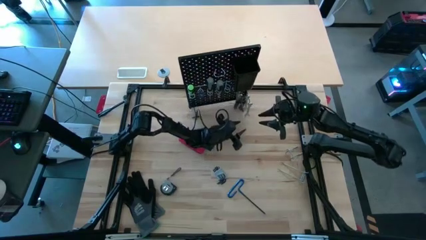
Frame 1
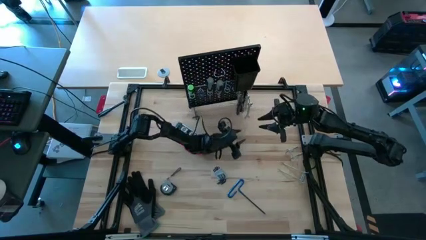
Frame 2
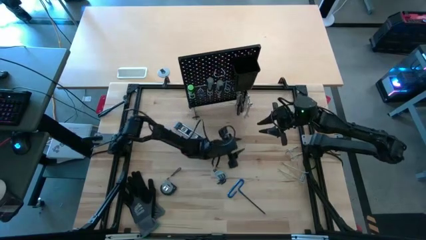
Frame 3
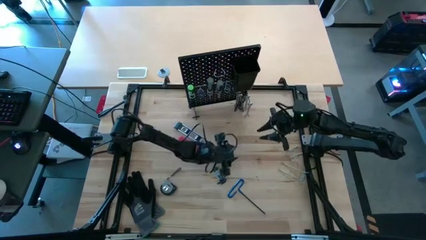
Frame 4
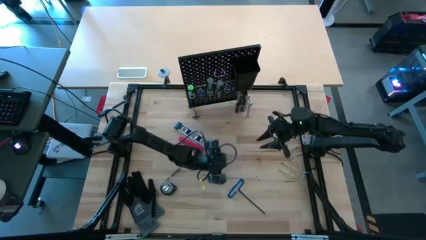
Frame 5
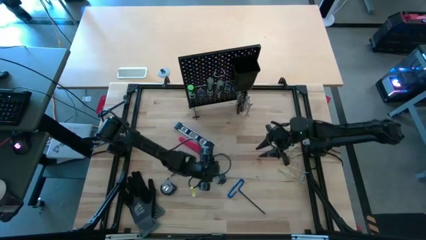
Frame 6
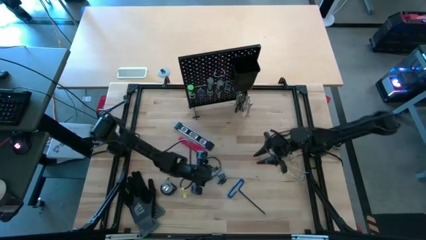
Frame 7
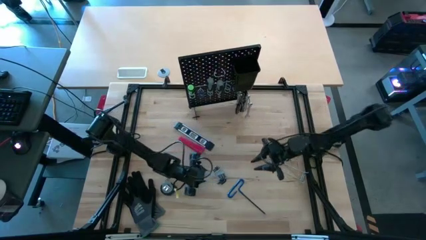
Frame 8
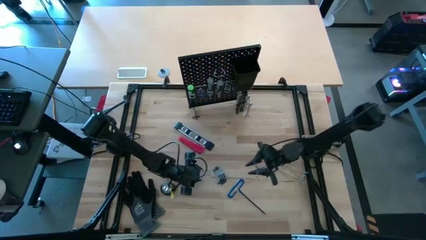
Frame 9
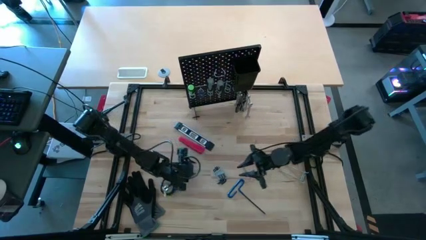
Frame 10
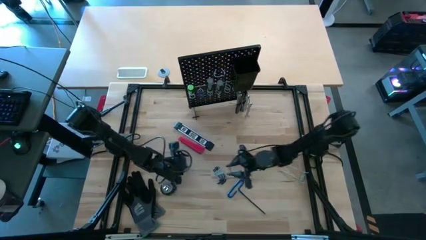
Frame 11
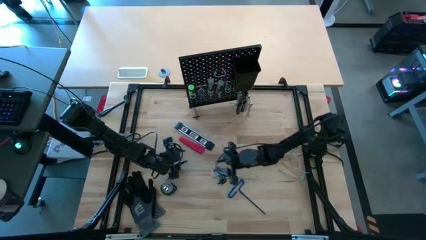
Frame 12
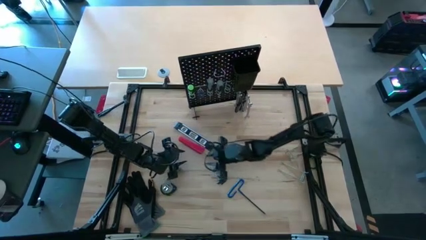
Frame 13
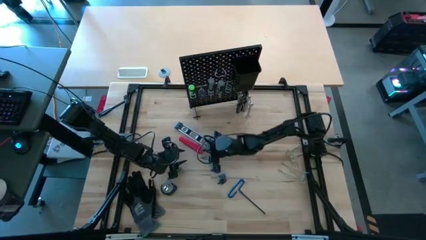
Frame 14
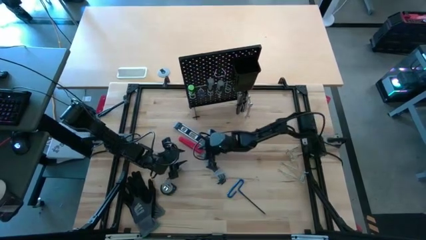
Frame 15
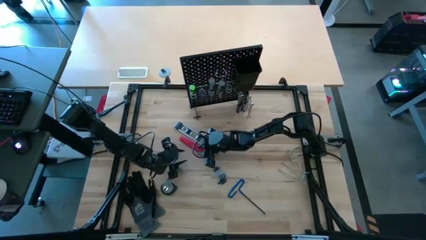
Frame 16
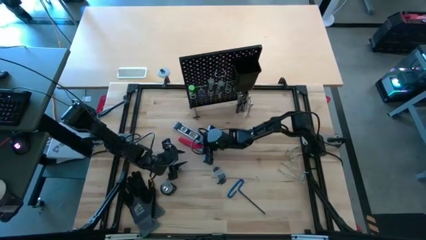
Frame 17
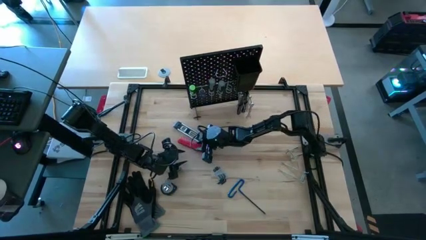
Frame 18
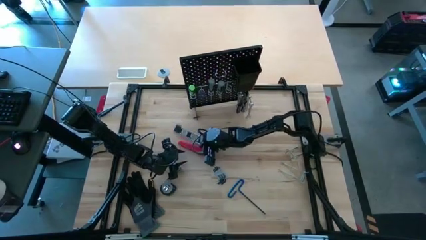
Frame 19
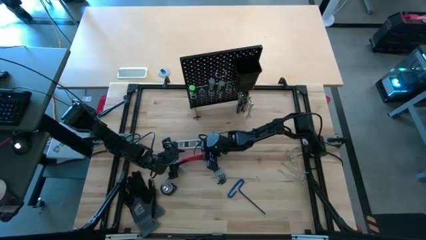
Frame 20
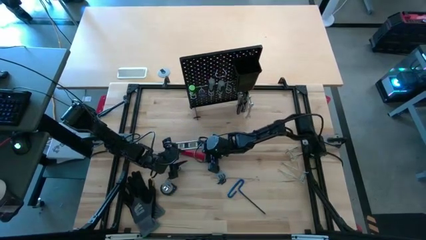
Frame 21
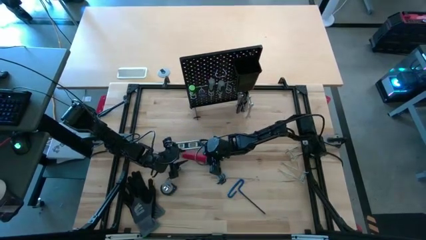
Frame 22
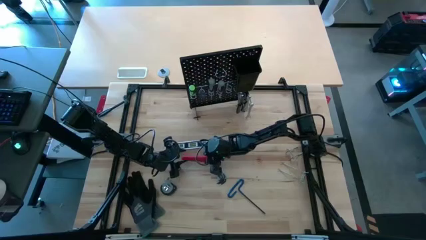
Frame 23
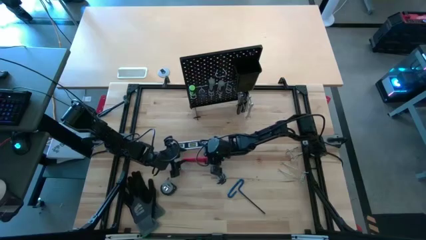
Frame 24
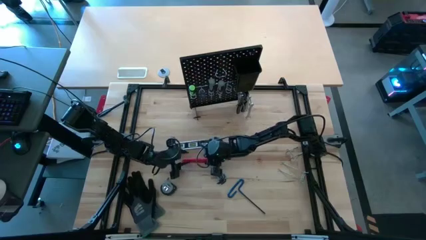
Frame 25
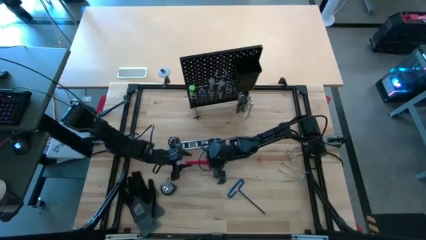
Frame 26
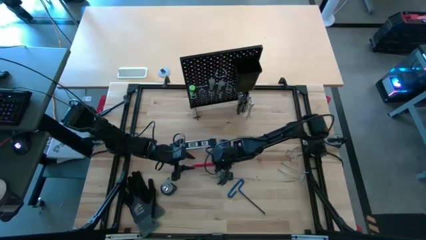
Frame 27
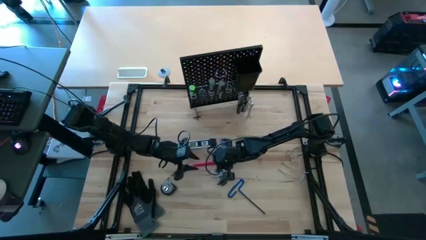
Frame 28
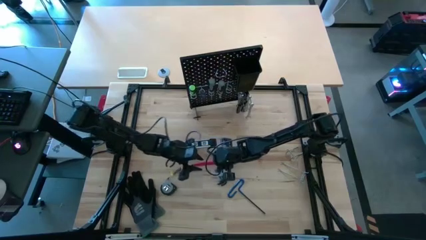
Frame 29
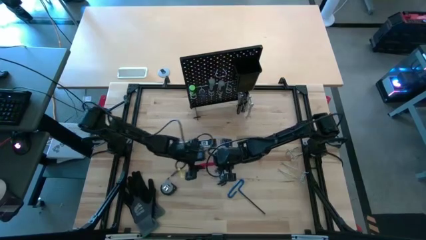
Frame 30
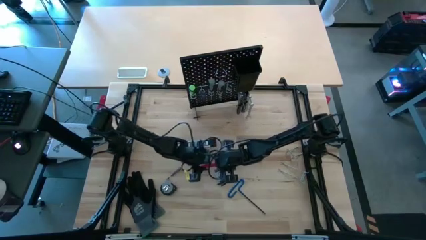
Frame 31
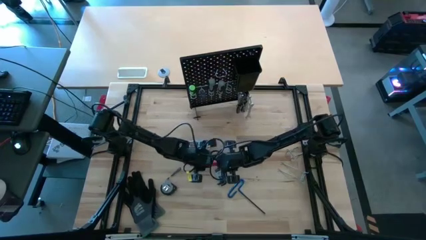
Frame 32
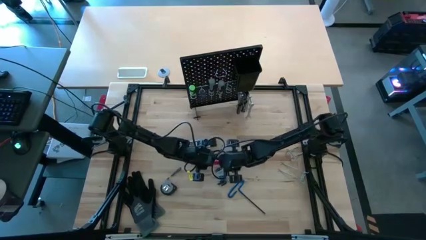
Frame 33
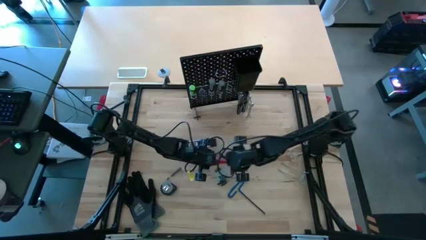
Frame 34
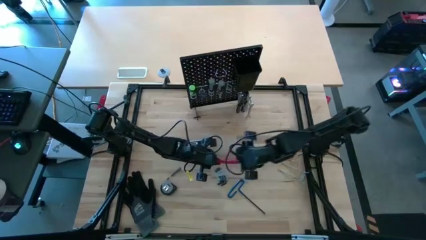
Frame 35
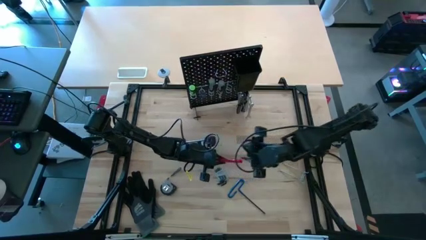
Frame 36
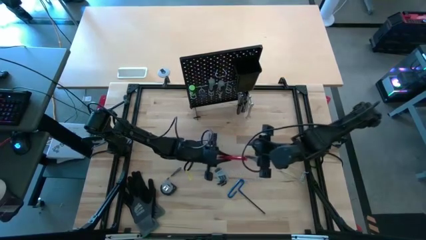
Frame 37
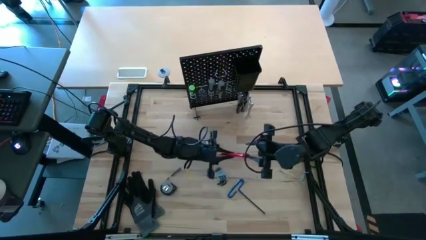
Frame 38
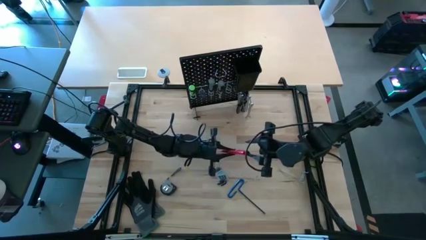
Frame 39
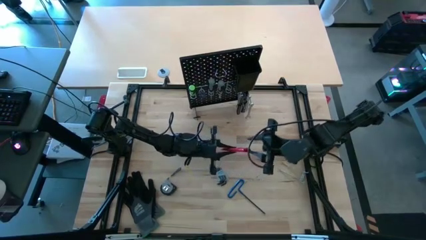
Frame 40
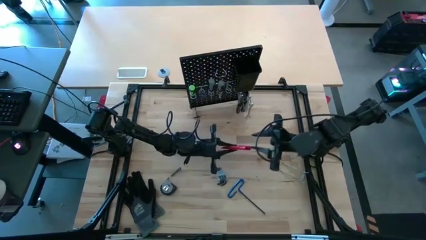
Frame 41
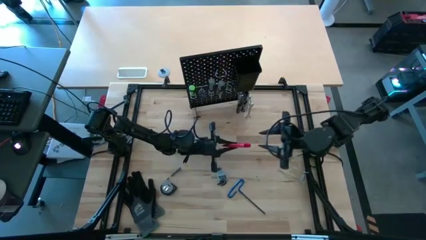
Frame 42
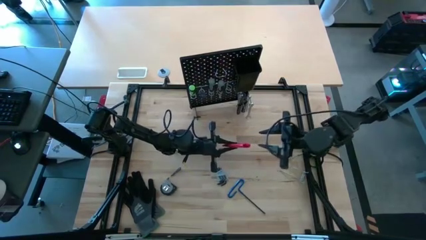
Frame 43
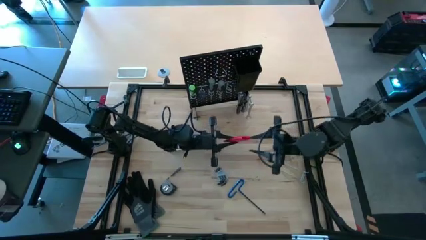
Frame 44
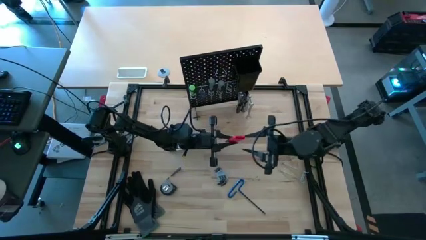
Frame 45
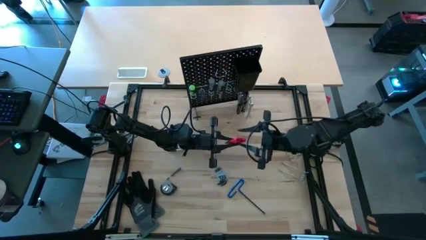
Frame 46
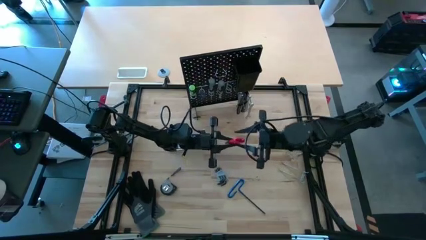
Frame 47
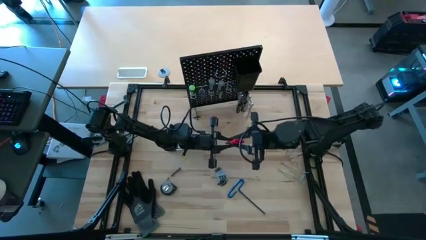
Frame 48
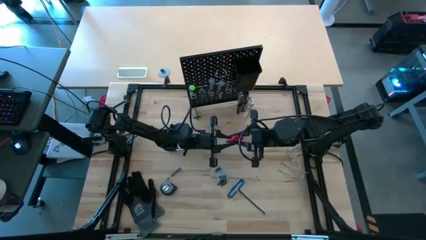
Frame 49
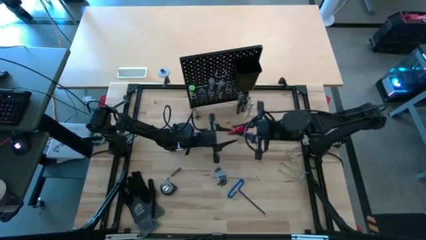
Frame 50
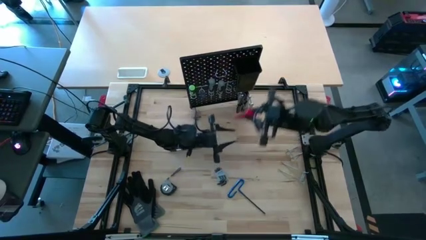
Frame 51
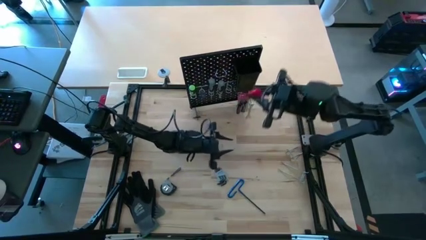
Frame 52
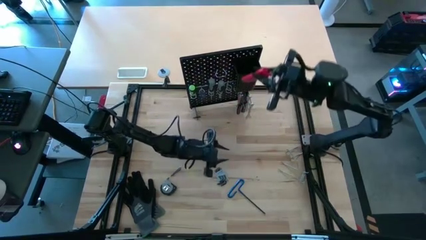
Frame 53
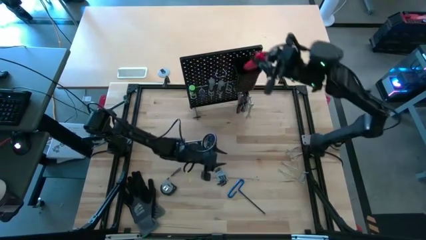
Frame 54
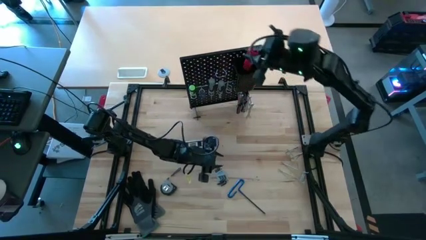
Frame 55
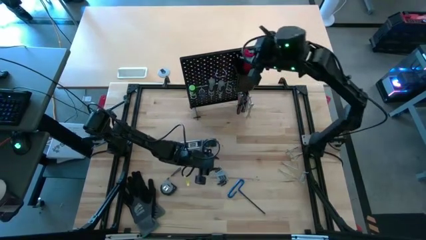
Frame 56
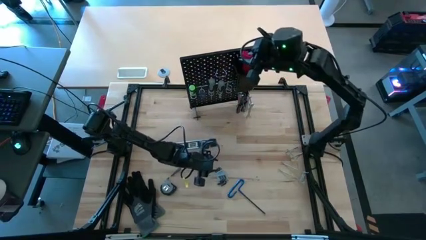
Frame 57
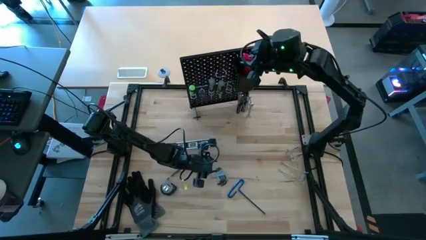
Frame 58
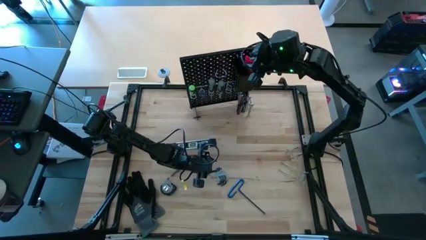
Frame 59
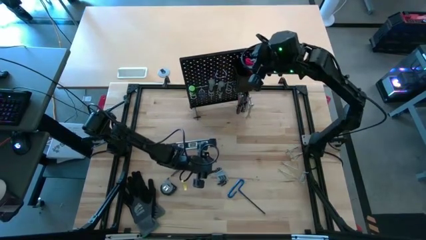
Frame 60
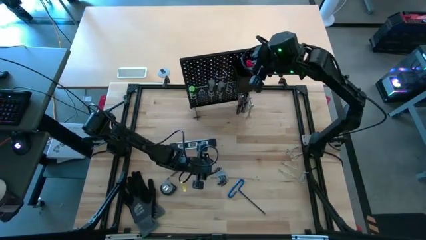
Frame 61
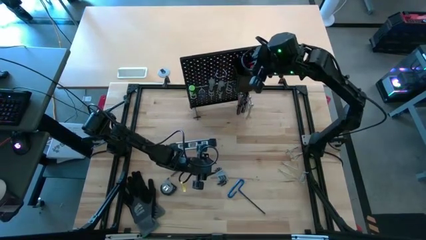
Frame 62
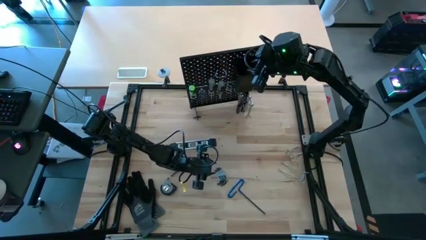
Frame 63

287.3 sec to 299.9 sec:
Task: Hang tools onto peg board
Put the red utility knife into the pegboard bin

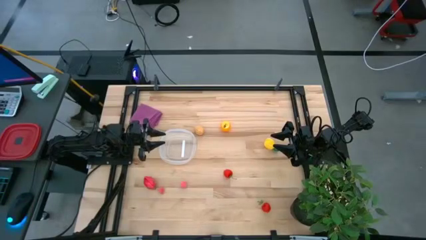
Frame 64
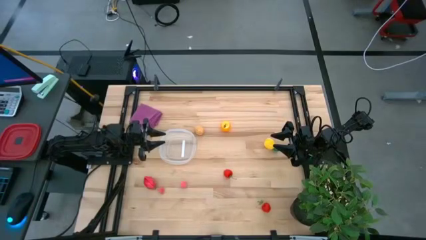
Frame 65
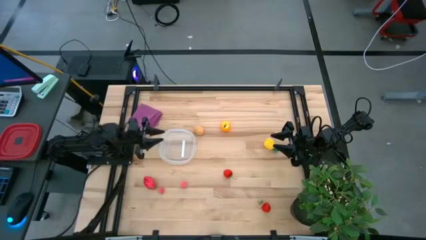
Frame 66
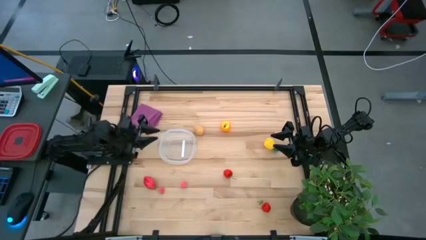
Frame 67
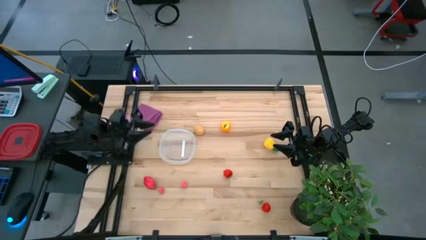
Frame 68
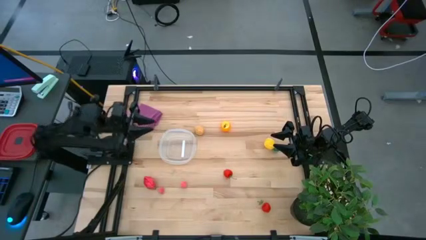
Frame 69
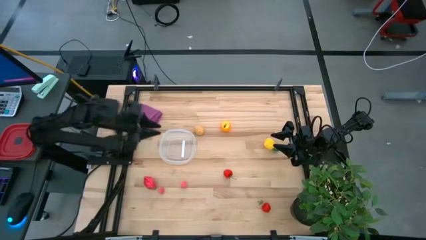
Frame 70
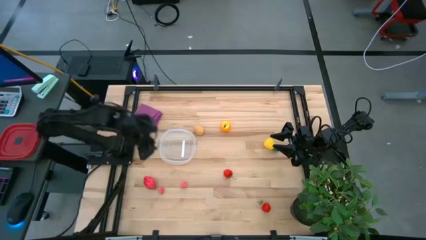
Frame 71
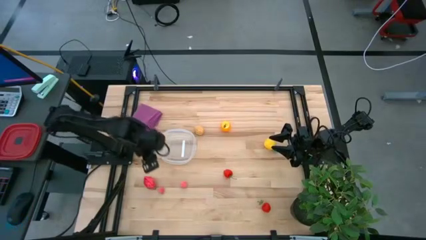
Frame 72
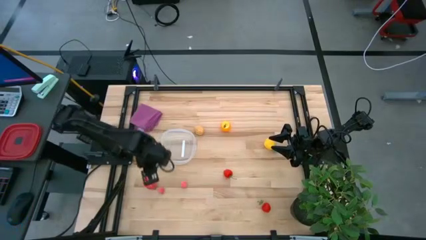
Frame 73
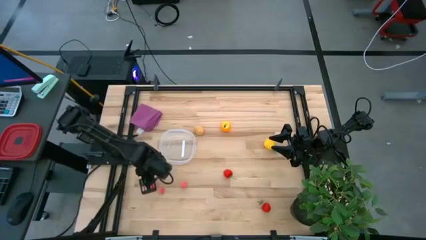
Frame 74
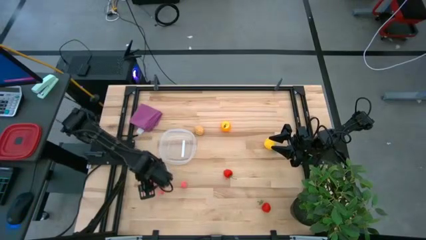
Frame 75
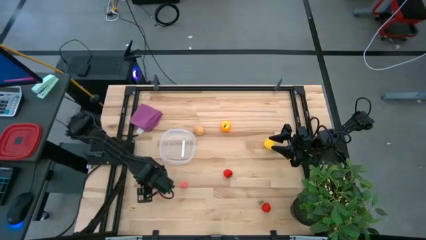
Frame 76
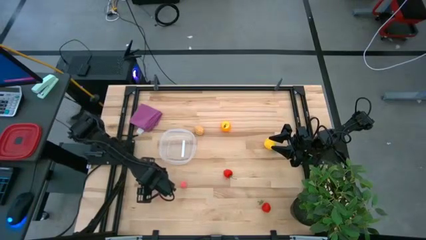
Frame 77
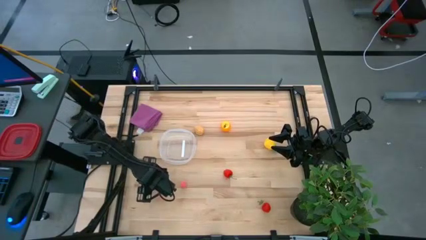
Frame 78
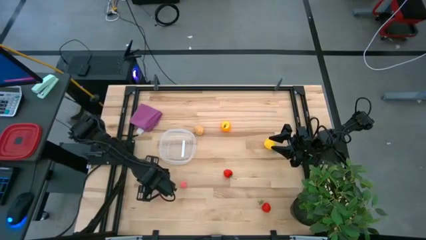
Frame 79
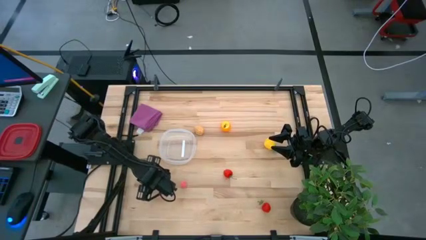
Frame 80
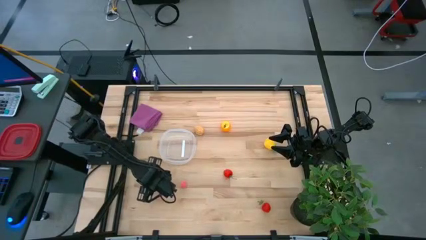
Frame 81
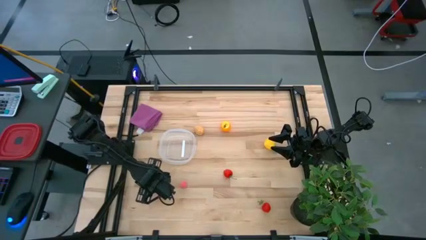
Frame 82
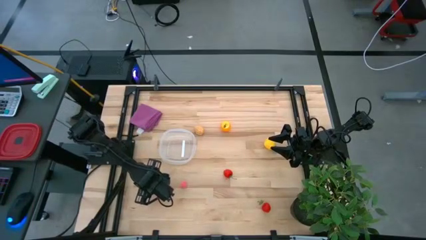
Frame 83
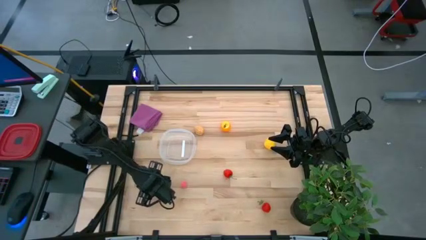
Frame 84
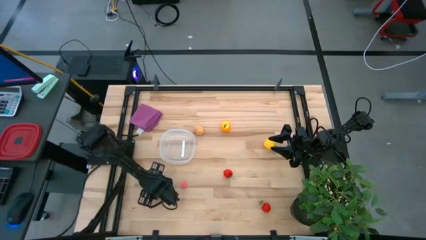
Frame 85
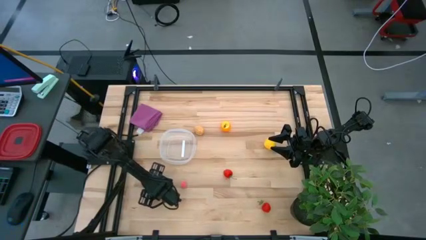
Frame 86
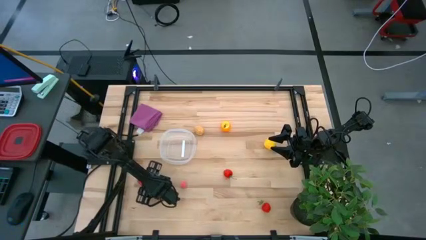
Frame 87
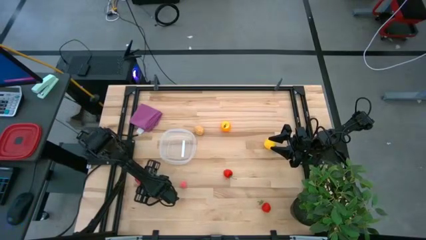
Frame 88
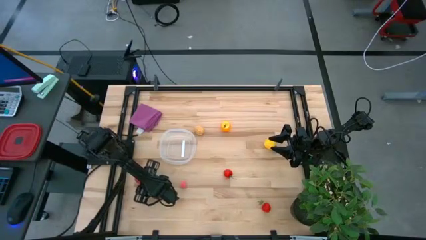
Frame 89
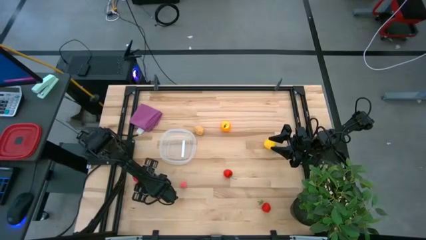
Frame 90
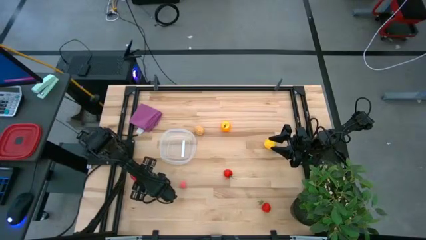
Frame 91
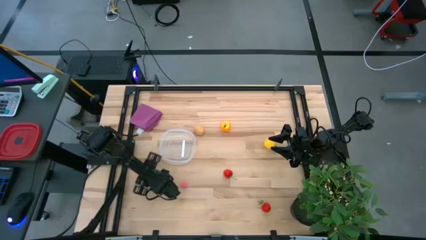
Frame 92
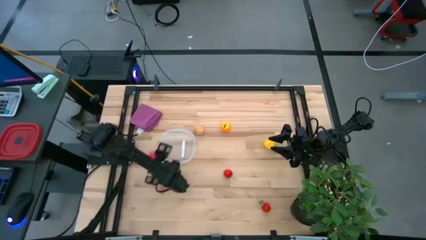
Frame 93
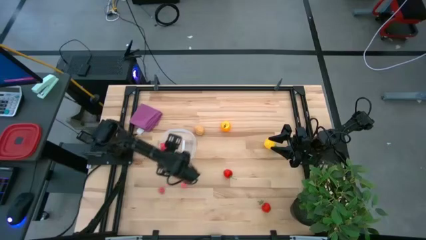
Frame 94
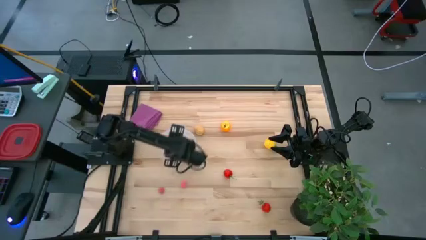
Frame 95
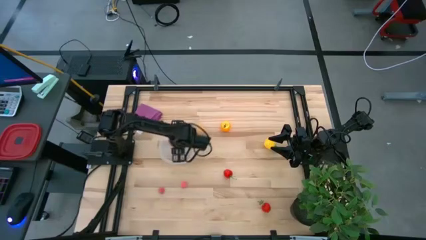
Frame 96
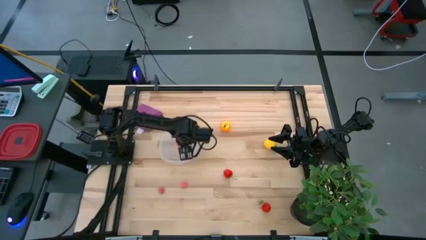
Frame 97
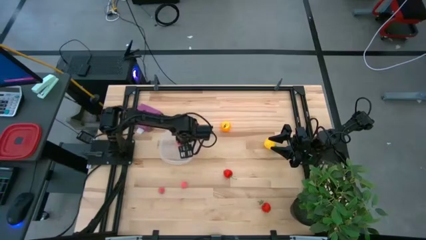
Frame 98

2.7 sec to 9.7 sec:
Task: Pick and placing Produce into tupperware
Put the red dragon fruit into the transparent bin
